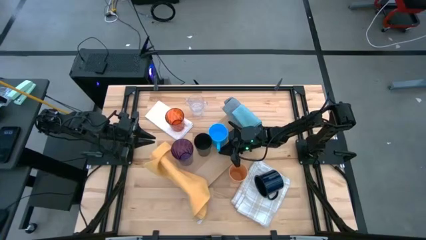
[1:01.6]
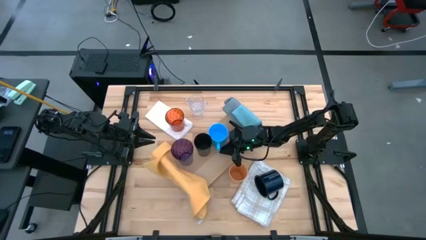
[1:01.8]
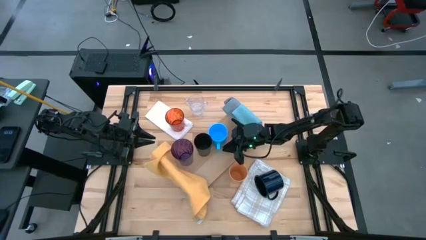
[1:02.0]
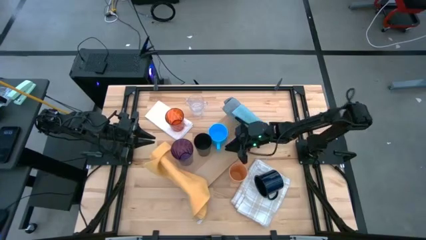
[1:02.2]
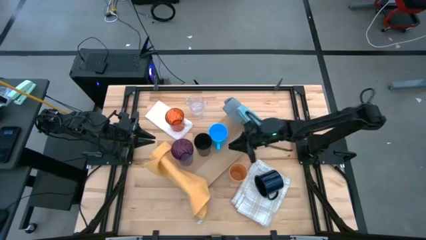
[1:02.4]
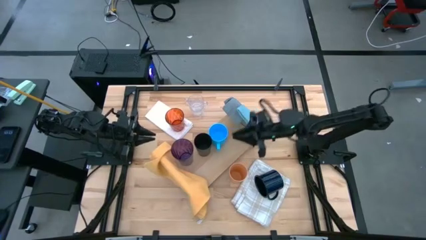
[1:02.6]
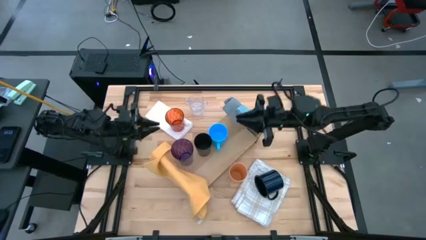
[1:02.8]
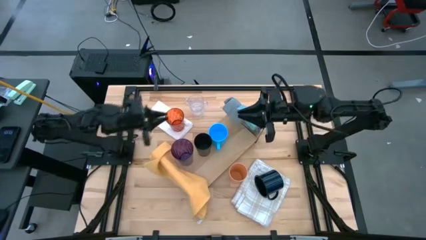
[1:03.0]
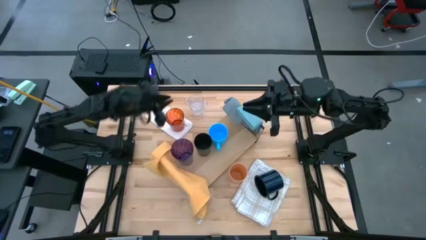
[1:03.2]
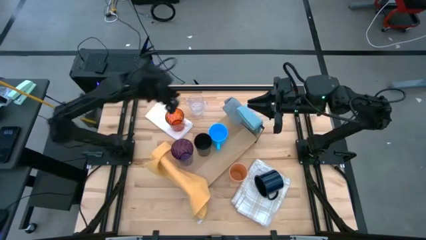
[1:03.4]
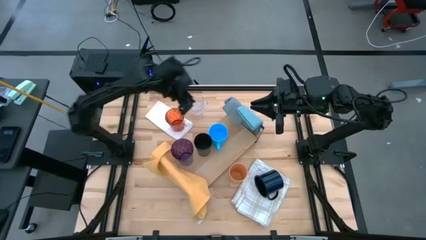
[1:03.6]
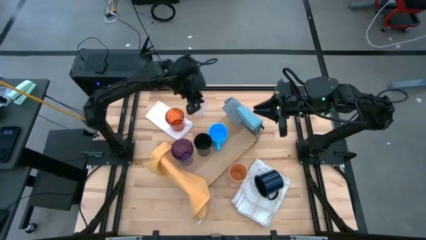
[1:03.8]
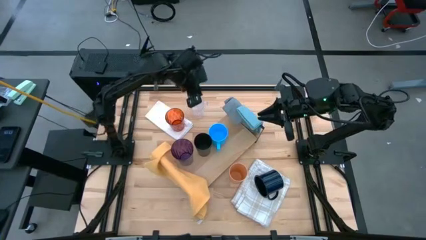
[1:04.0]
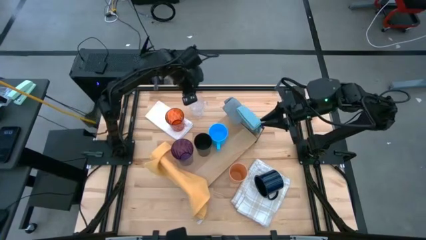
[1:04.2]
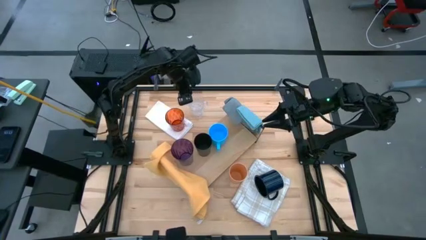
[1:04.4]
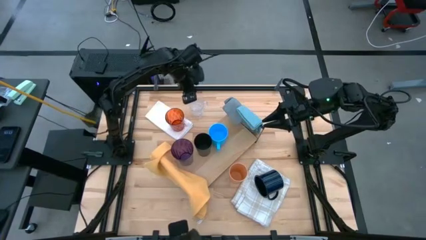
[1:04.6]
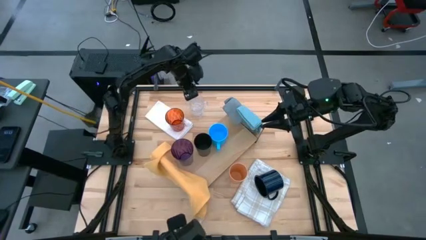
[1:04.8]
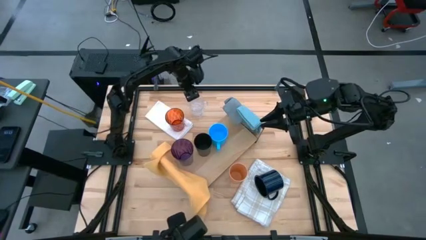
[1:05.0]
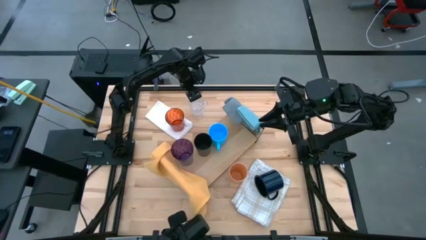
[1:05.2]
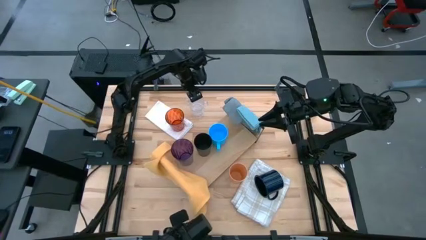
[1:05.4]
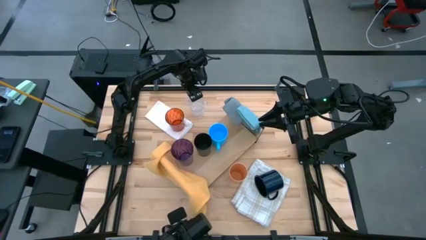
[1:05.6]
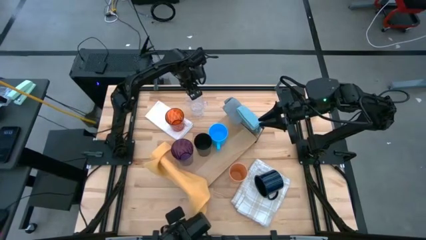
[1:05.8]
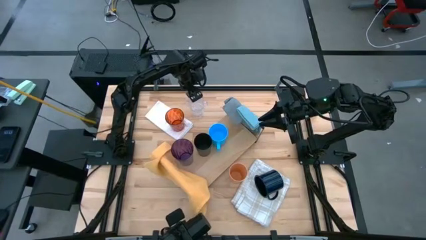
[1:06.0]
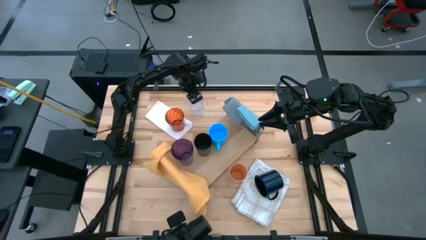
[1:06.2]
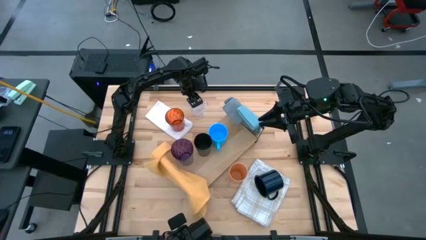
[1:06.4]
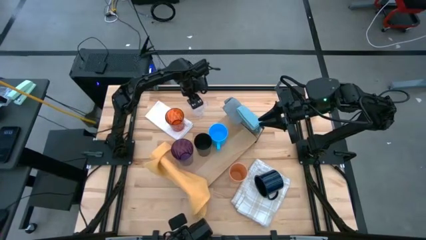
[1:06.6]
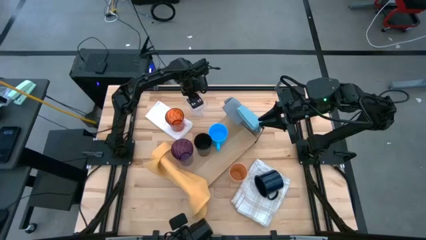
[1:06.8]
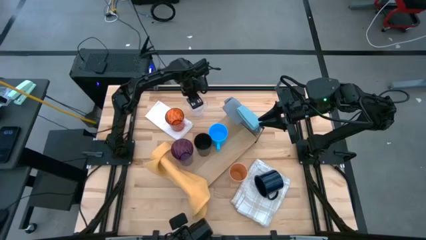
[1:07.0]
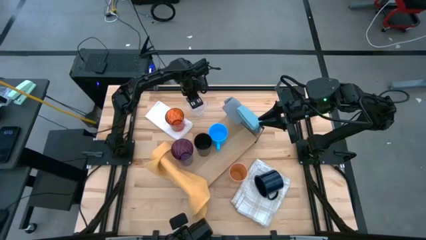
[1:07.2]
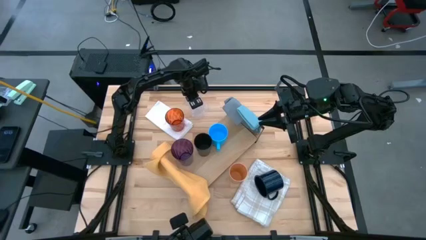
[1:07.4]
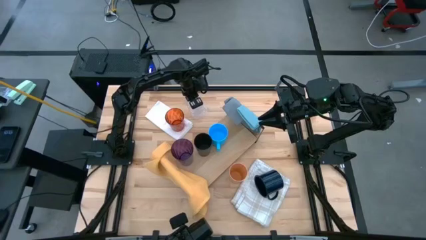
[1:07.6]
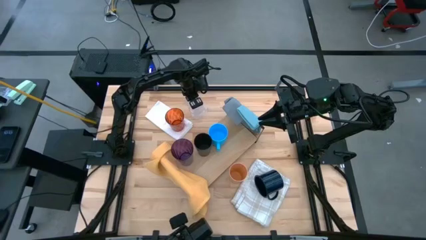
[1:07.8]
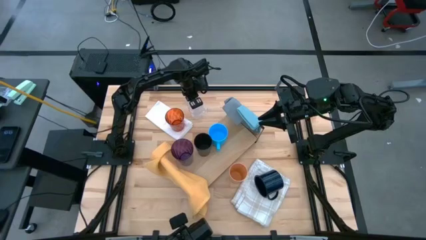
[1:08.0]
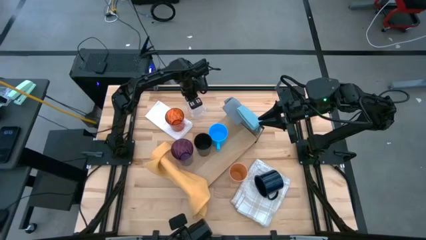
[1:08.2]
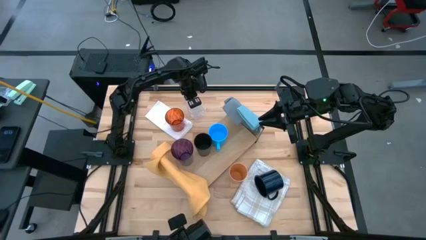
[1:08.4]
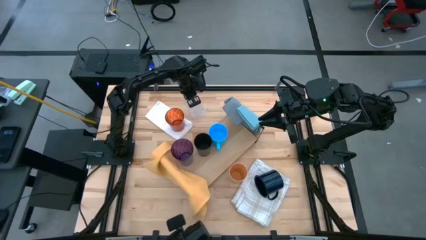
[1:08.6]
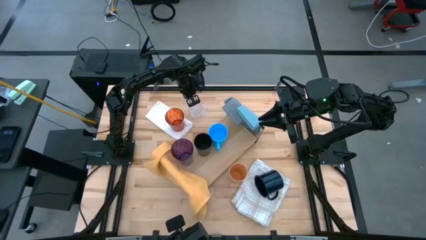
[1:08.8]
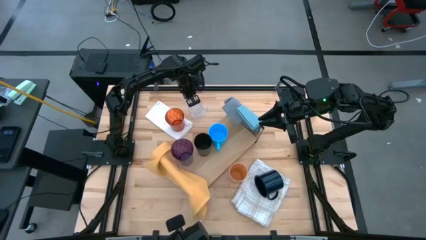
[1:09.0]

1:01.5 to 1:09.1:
Task: Stack small to large cups/mugs on shelf
Put the transparent mug on the shelf

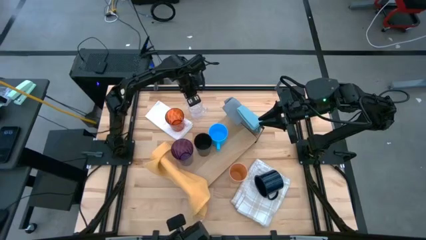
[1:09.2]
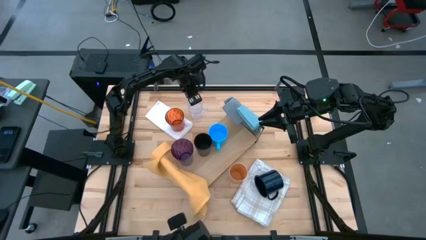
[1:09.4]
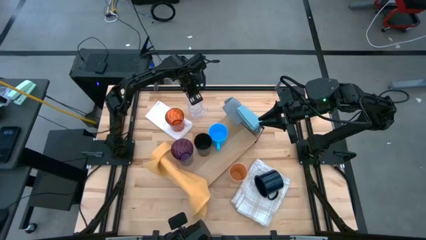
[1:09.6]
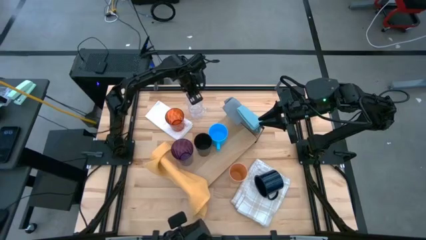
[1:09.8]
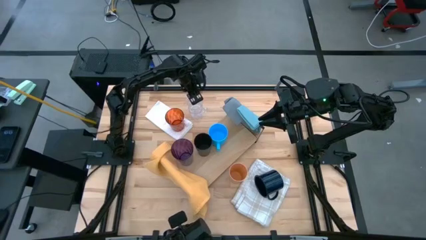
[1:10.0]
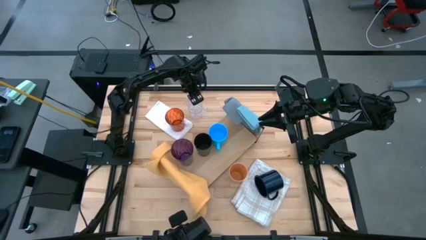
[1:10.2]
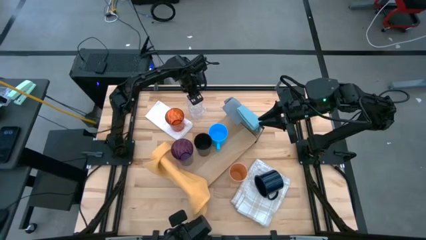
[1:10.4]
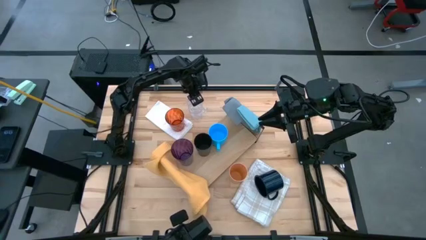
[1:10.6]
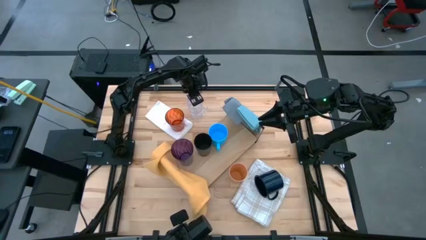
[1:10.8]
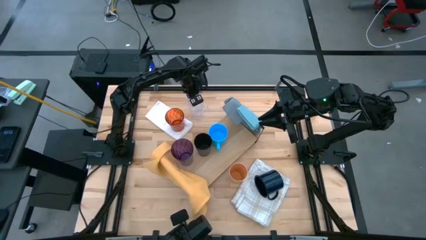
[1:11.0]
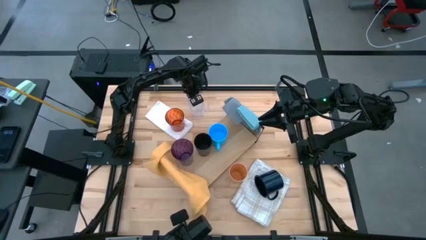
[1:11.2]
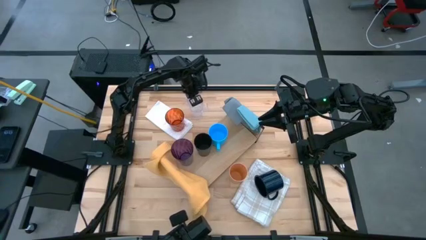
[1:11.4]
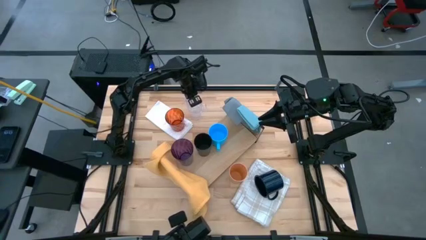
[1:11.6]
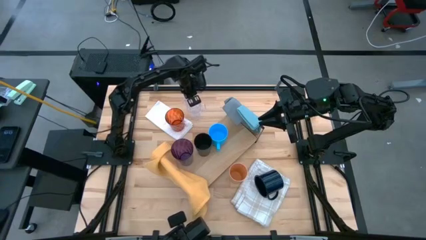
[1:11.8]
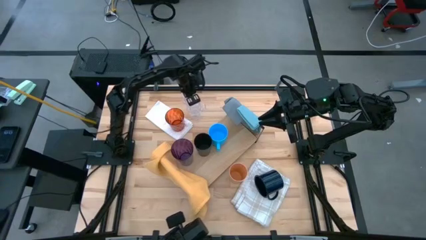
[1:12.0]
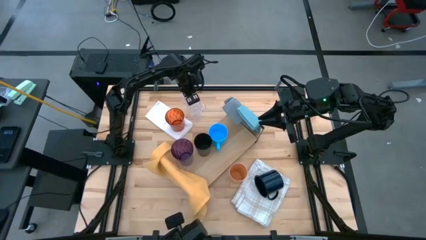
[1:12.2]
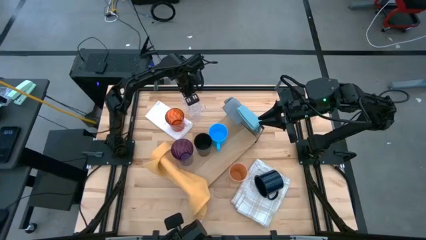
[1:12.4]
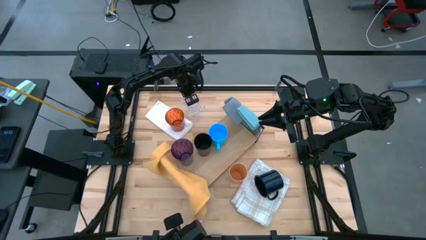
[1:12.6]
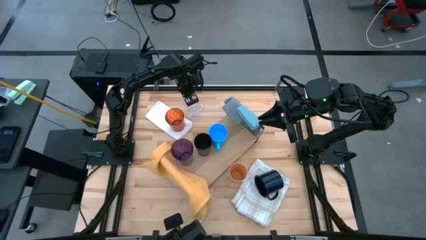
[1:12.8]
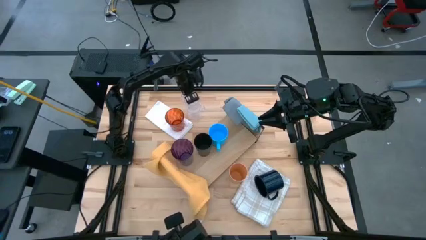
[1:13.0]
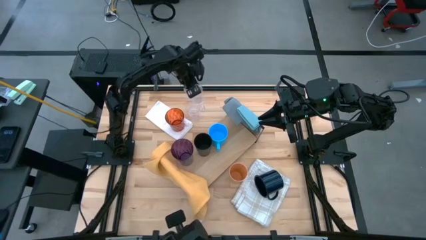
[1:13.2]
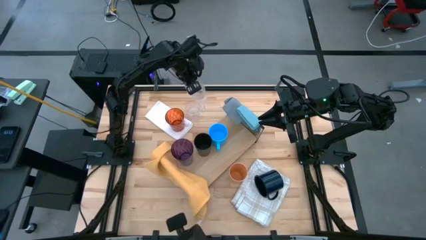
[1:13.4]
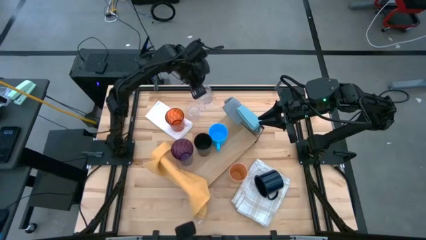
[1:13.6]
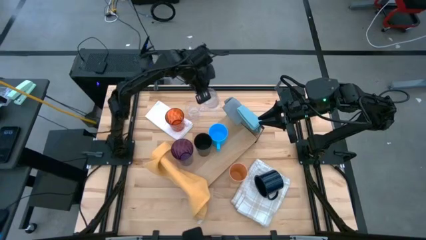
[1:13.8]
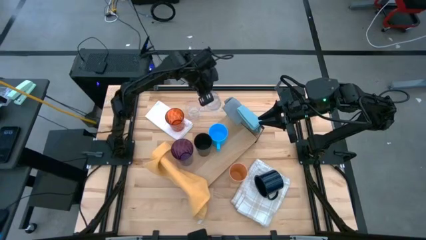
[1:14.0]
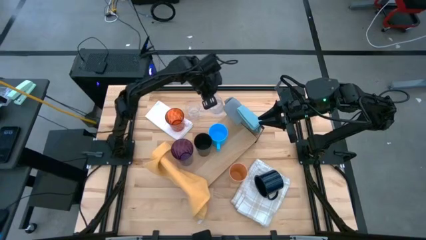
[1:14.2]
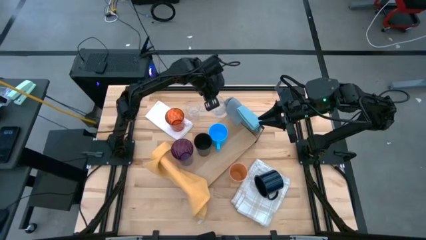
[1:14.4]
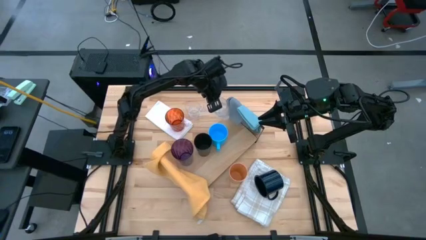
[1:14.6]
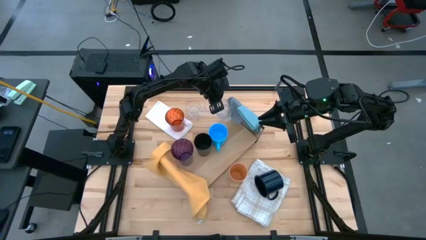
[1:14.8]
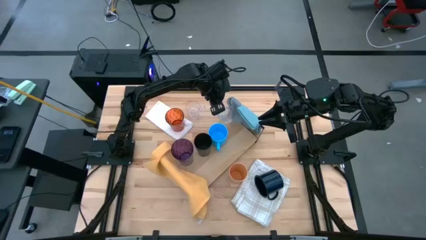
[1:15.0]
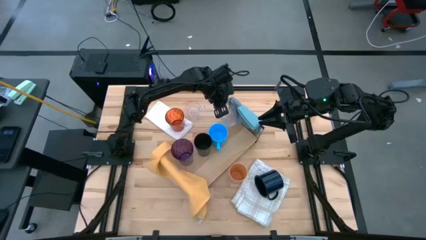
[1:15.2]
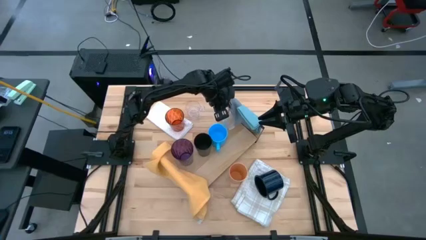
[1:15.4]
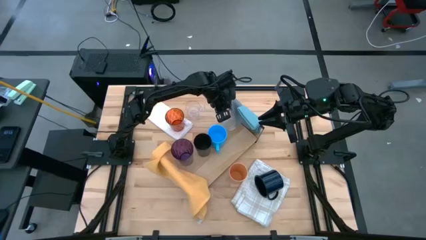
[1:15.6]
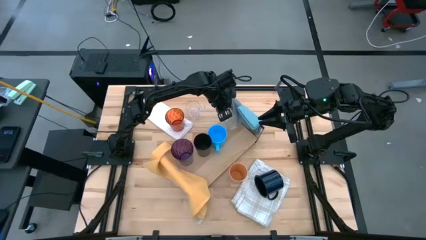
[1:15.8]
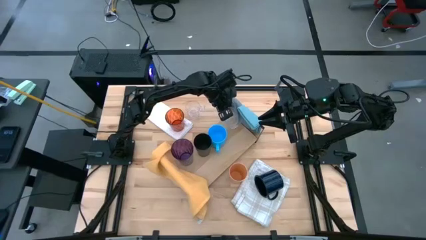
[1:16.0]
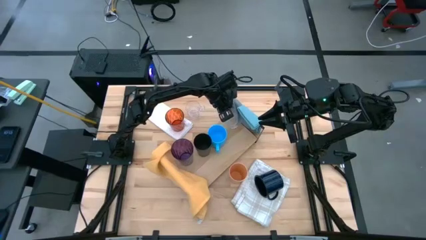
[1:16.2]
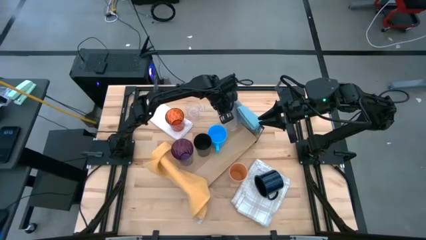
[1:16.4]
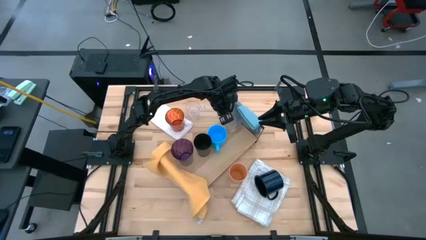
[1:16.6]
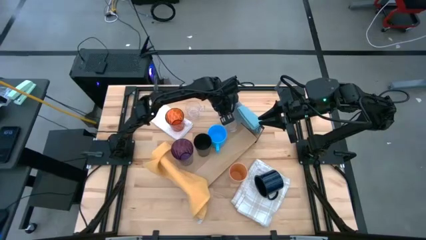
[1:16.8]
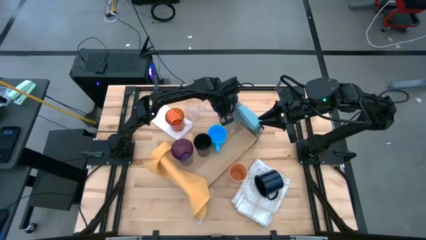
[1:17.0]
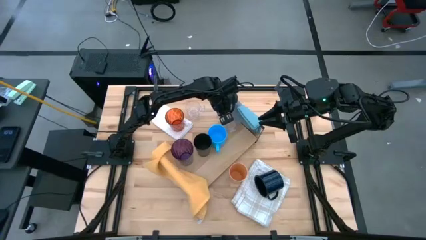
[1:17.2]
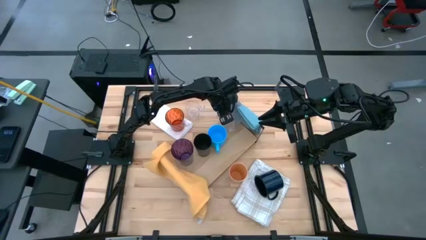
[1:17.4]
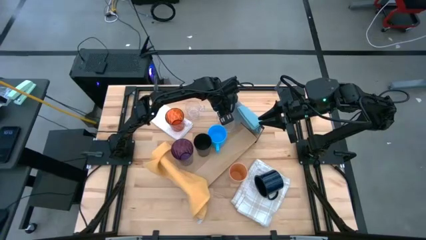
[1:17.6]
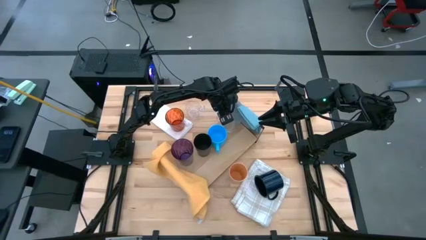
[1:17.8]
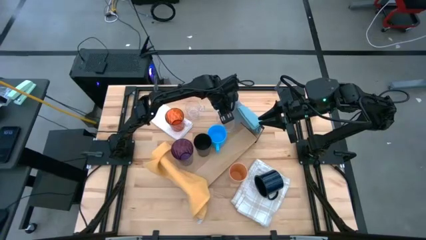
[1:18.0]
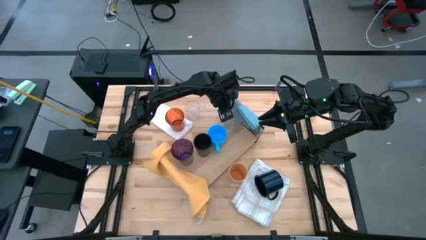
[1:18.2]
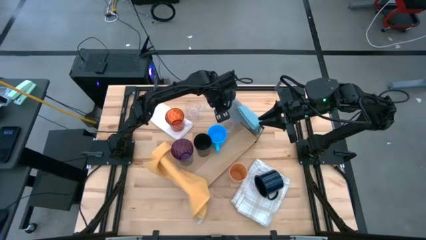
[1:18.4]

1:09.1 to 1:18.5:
Put the transparent mug on the shelf
